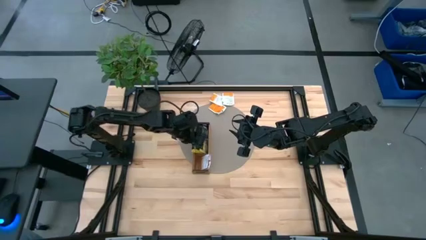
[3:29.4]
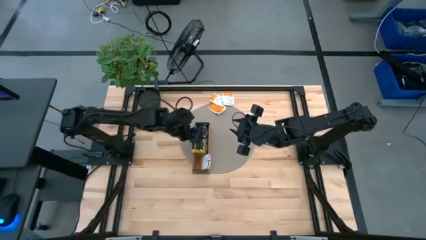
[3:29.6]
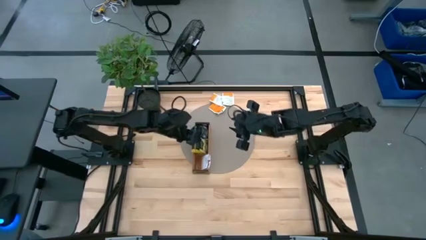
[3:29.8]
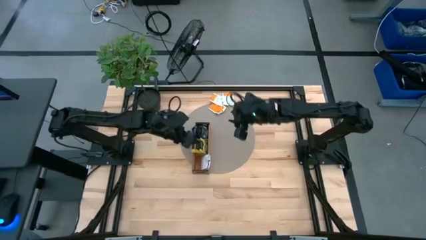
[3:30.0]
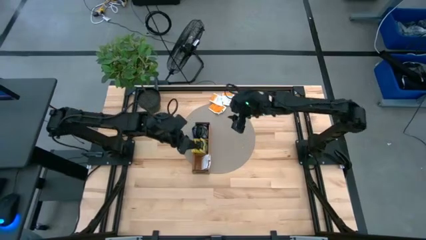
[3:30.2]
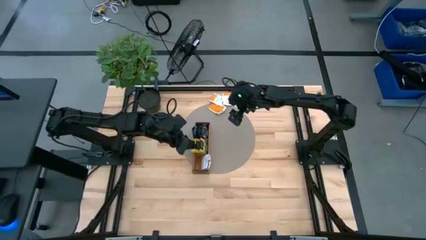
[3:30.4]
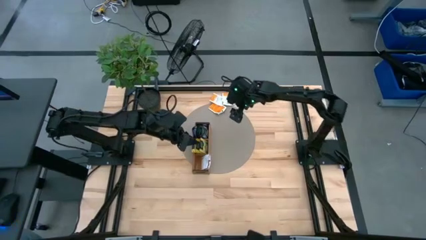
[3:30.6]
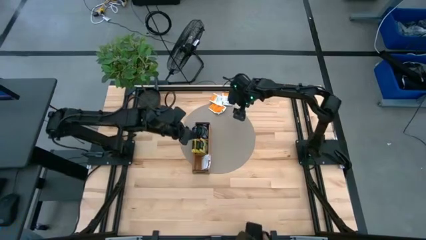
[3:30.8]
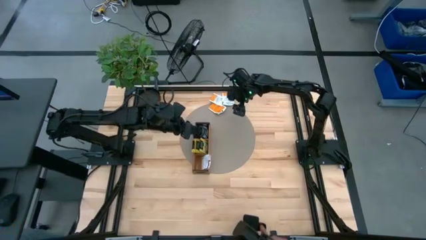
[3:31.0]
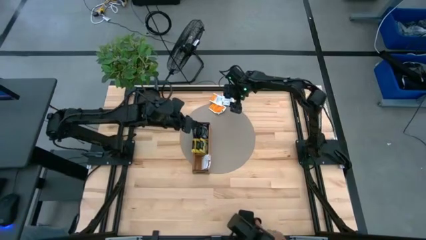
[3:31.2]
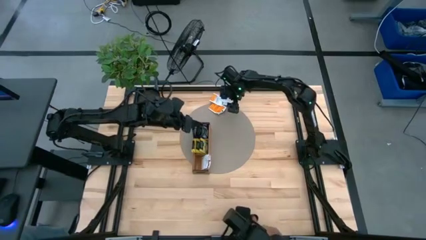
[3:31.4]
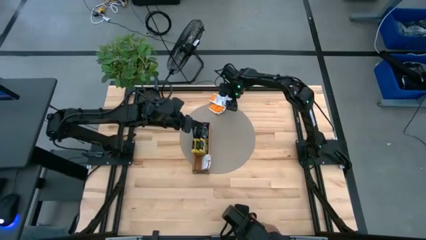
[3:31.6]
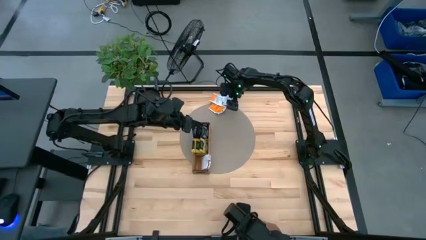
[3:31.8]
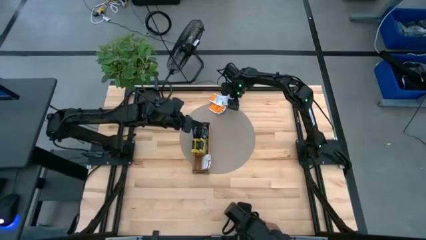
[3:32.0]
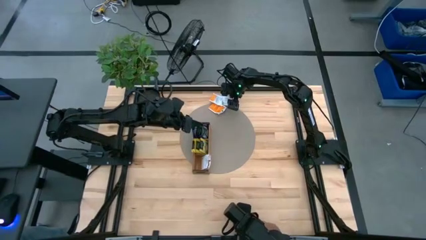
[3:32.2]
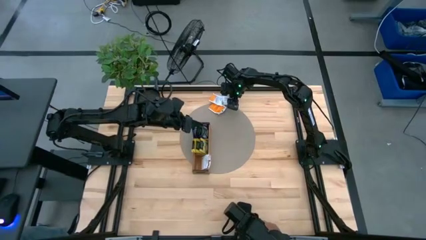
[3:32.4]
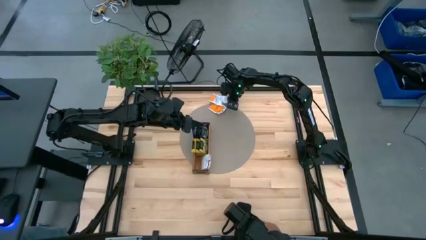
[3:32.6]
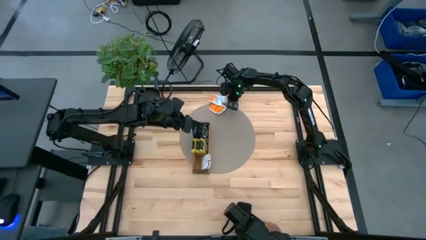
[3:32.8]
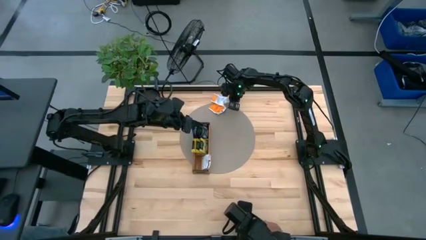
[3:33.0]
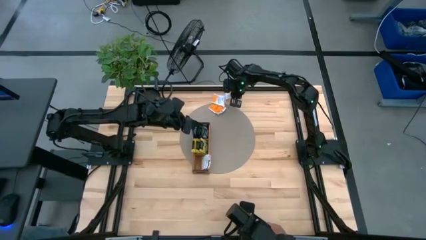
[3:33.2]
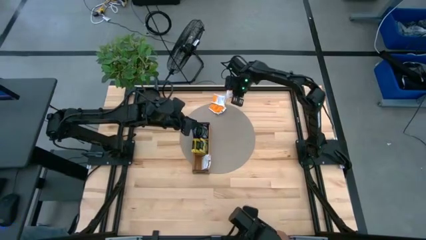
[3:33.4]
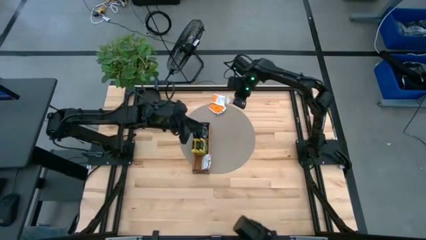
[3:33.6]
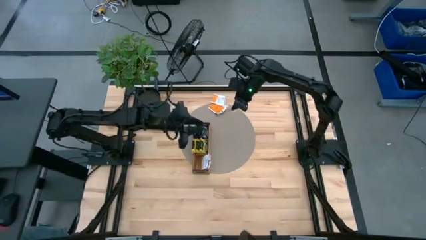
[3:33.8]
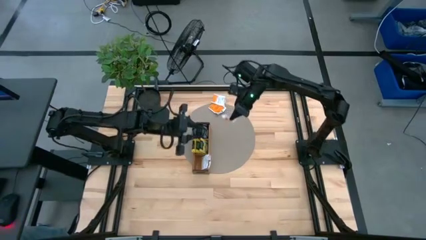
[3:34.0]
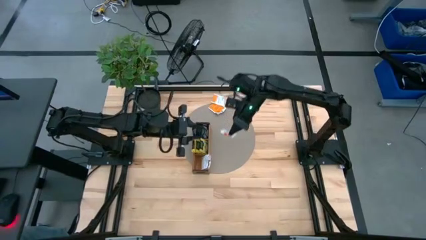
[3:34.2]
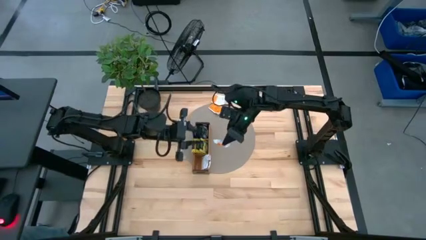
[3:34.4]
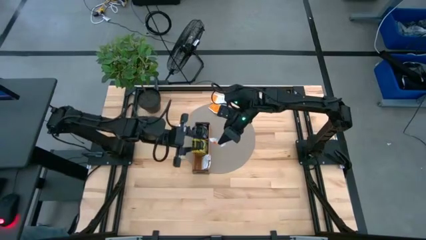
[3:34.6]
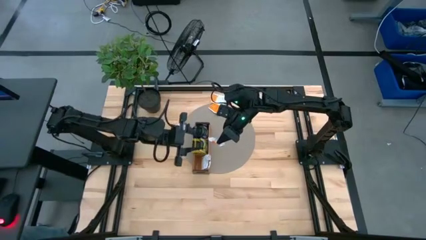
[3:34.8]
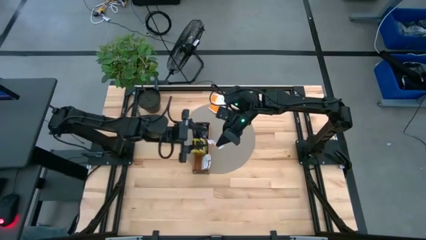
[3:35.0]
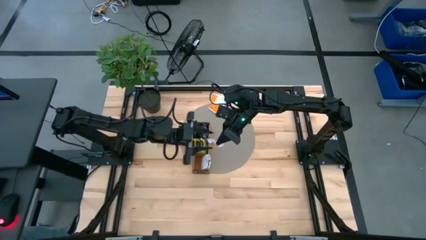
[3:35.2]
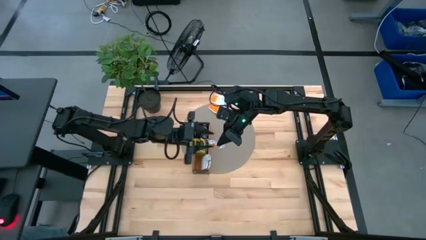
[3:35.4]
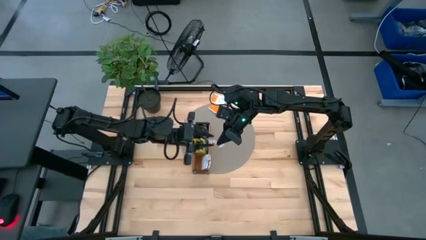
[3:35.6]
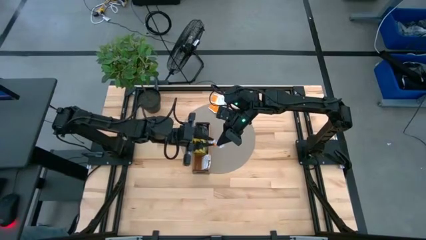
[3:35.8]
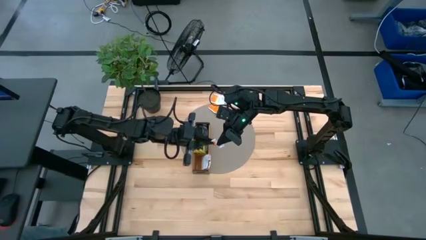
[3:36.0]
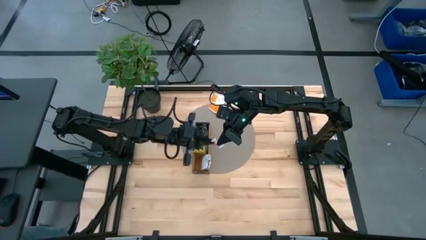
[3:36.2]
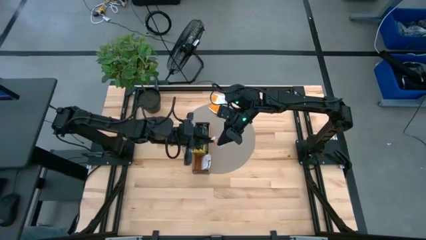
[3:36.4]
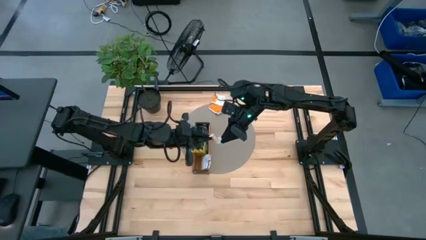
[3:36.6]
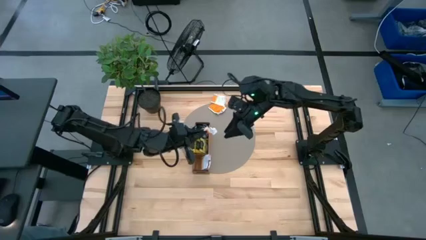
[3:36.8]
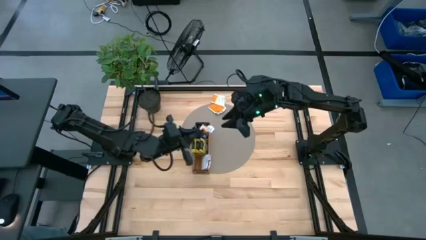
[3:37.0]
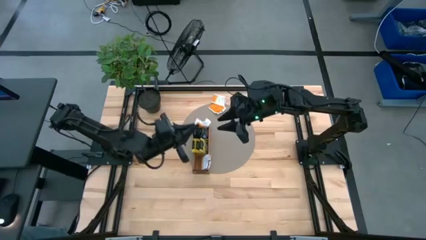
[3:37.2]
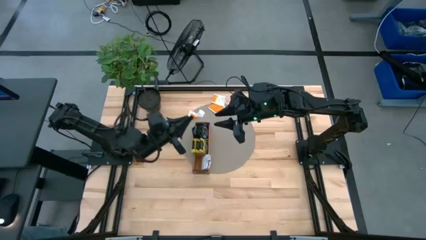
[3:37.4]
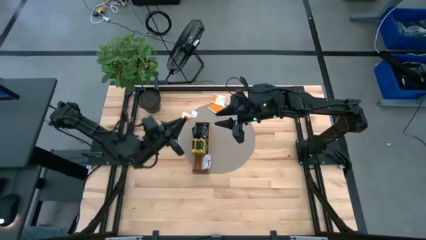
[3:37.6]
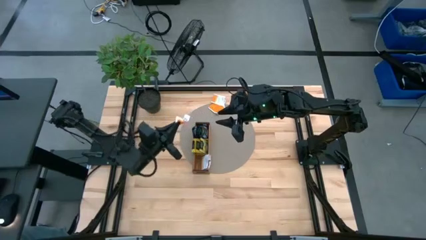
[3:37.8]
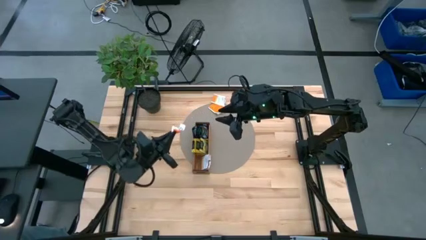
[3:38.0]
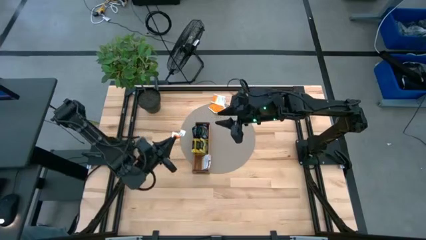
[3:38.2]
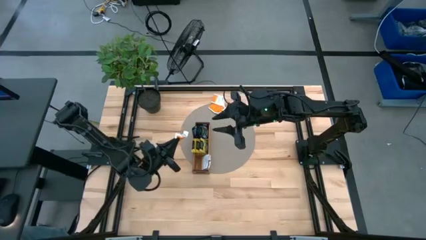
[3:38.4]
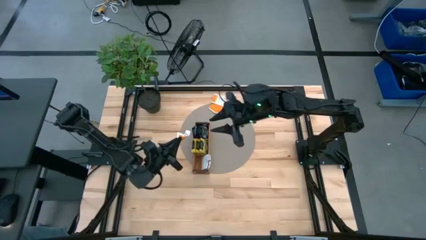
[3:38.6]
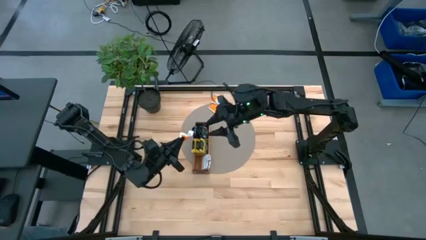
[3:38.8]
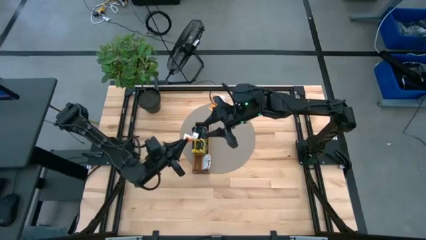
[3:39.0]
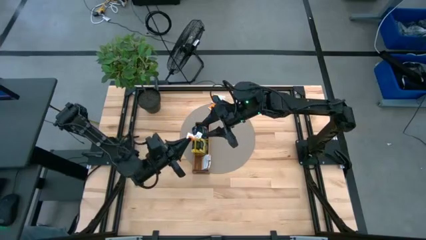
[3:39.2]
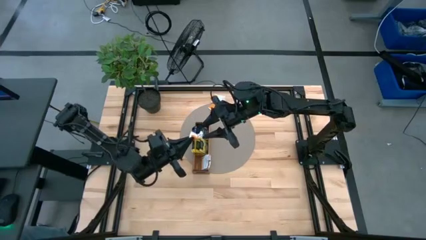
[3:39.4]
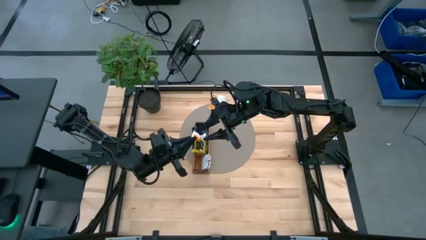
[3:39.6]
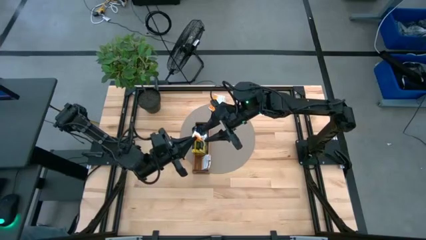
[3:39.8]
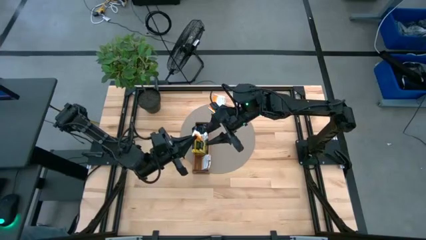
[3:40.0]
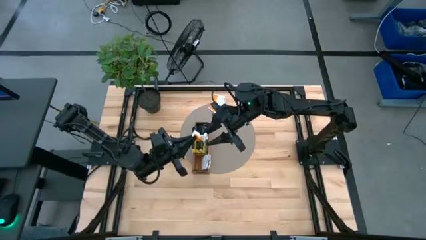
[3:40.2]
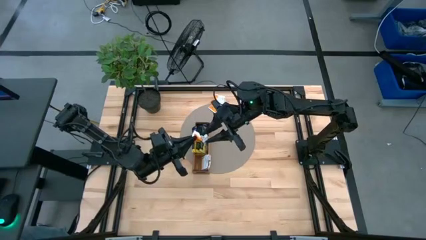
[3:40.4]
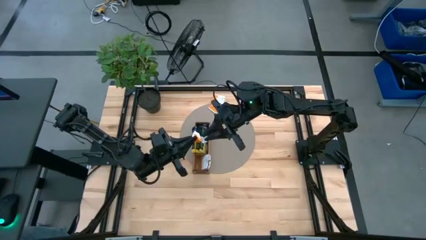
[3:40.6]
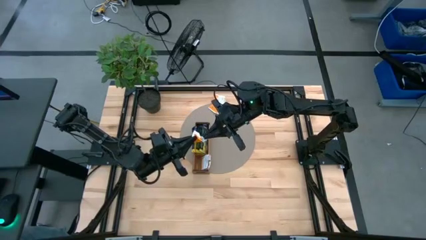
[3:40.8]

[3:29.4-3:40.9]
Task: Pick & Place Tea
Put the white tea bag into the bottom section of the wooden organizer
